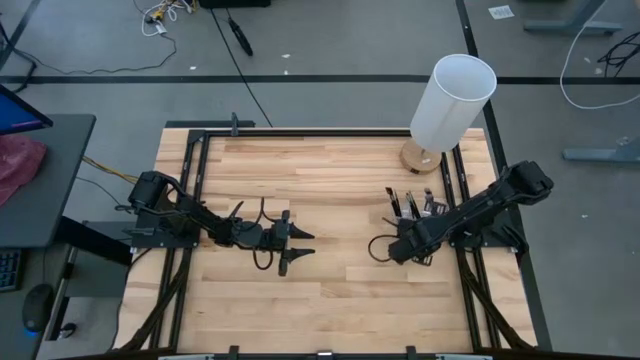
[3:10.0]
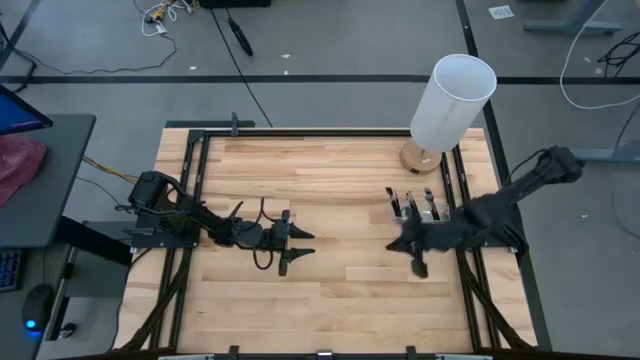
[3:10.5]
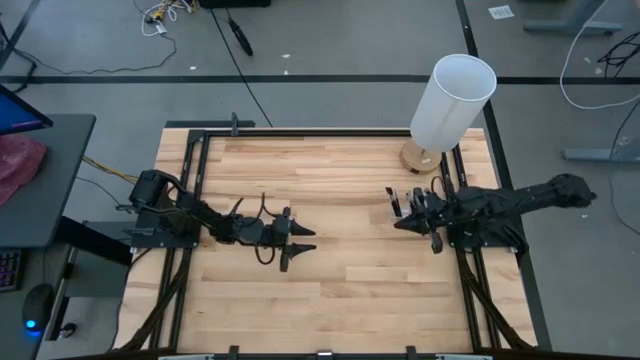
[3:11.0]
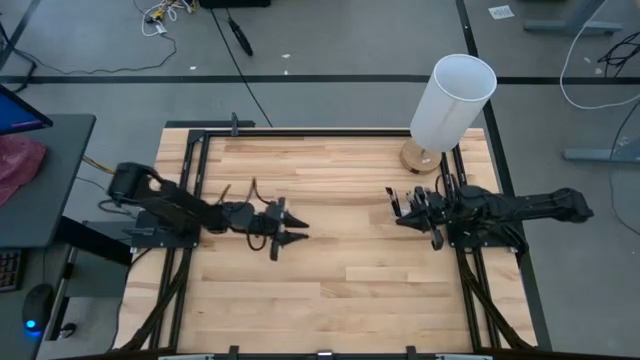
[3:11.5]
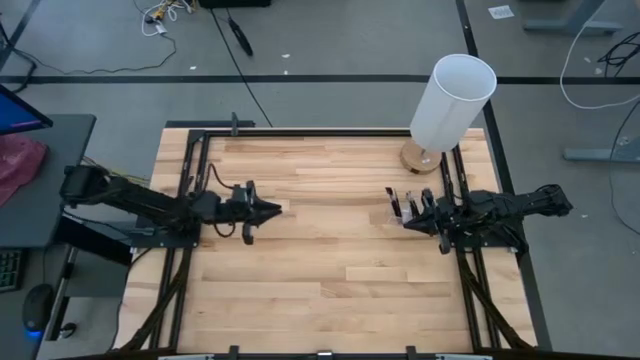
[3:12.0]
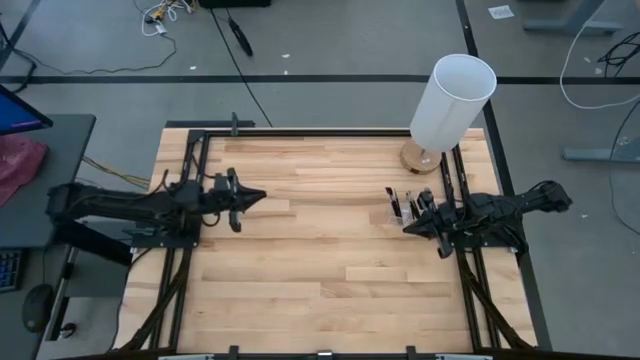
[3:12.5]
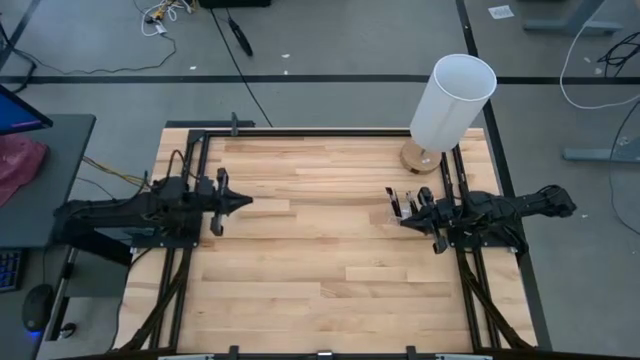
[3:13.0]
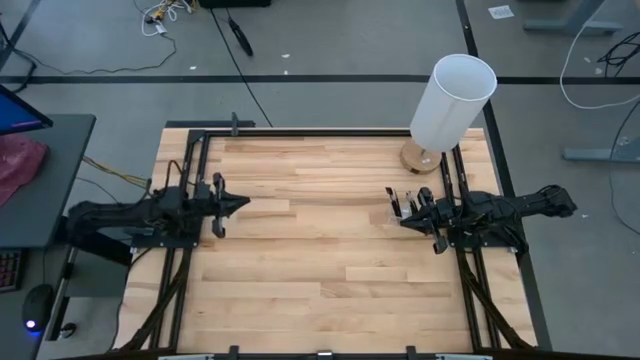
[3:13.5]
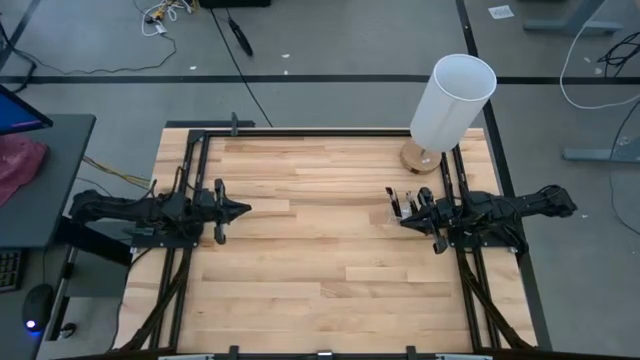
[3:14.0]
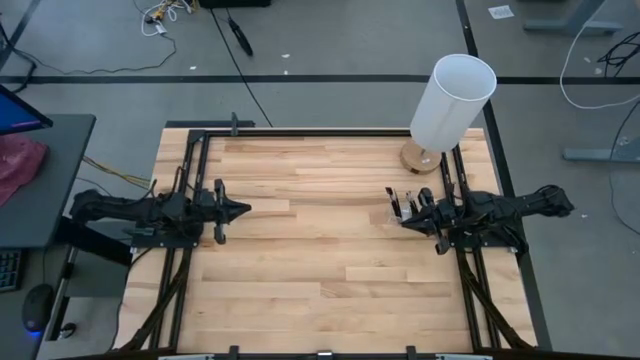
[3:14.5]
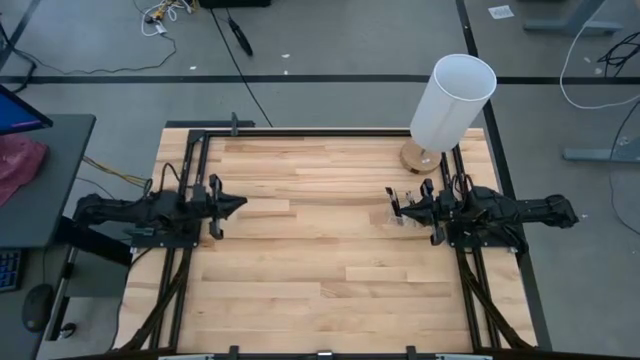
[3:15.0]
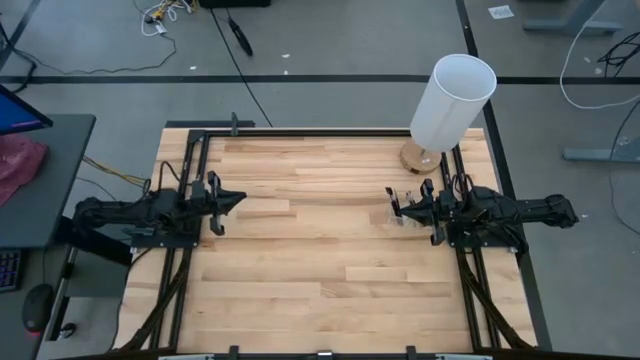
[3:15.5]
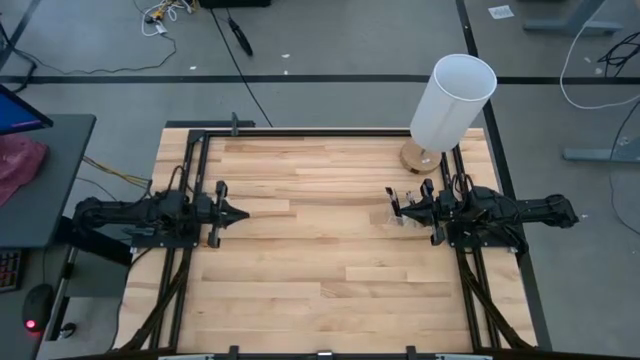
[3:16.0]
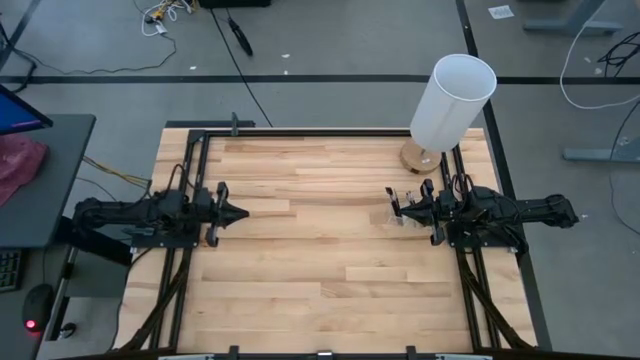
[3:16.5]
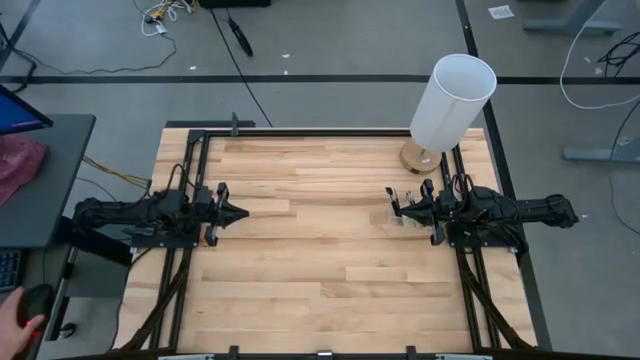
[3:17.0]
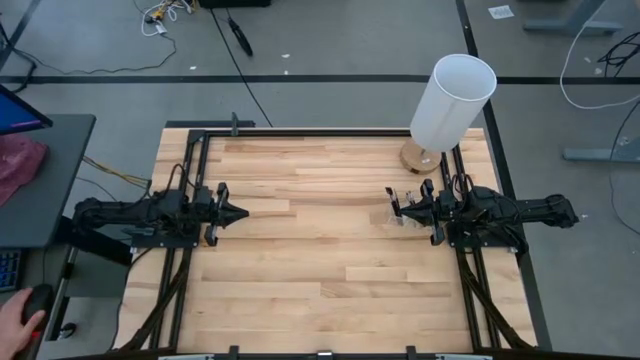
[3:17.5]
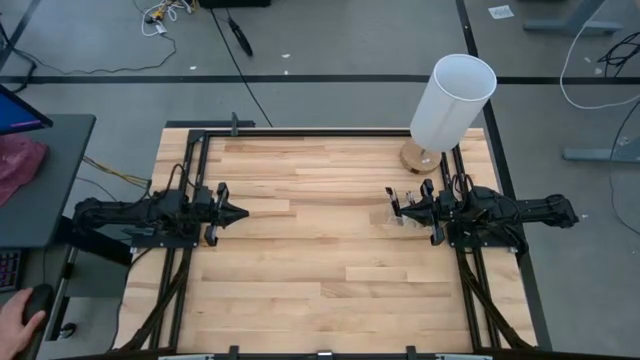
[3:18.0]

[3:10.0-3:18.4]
Task: Put items in baskets/containers
Return to Home Position

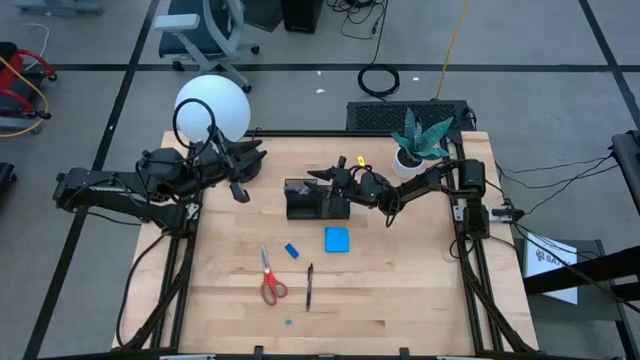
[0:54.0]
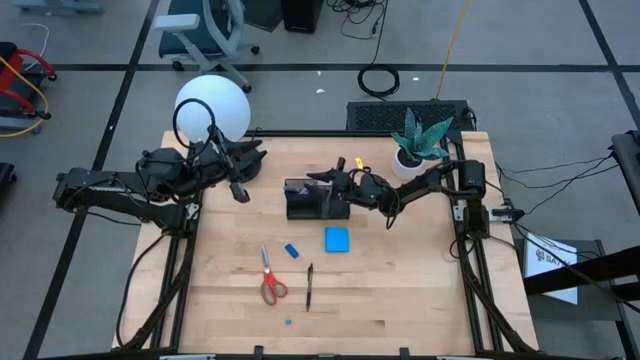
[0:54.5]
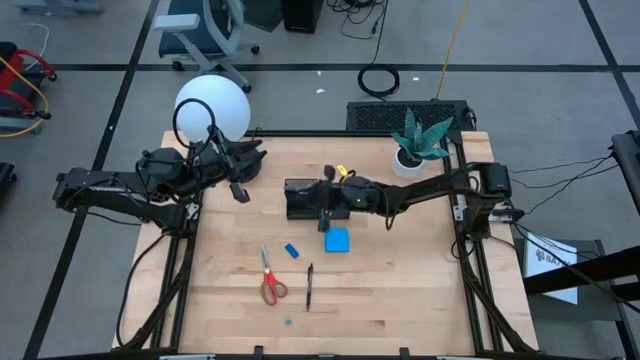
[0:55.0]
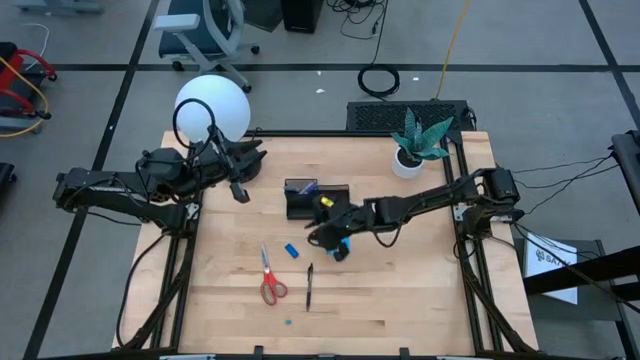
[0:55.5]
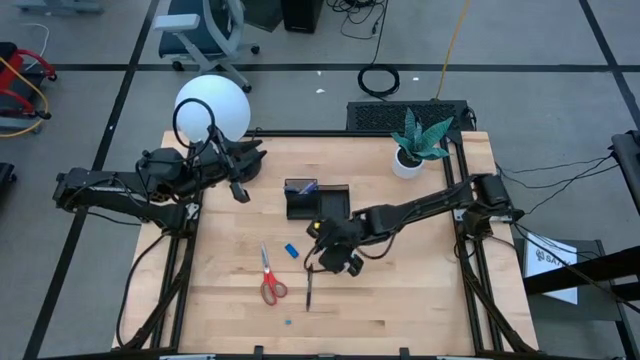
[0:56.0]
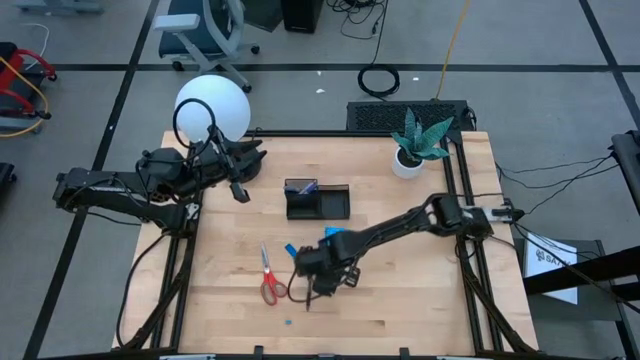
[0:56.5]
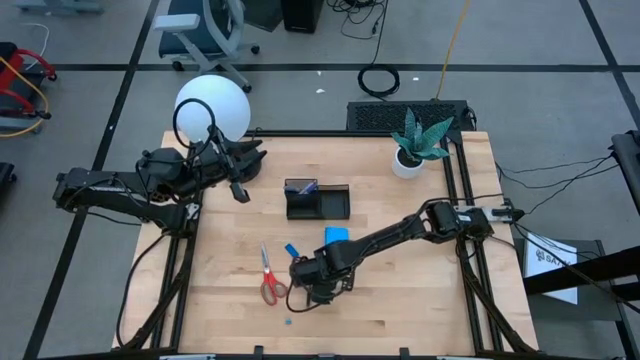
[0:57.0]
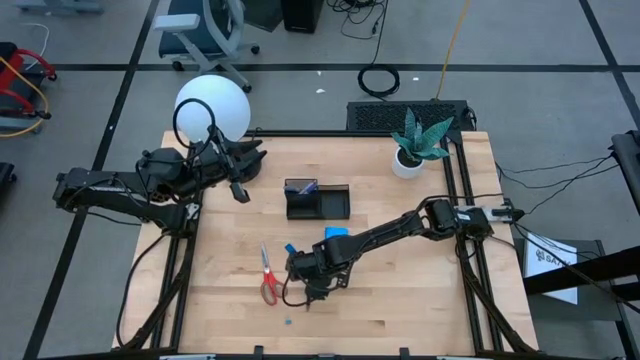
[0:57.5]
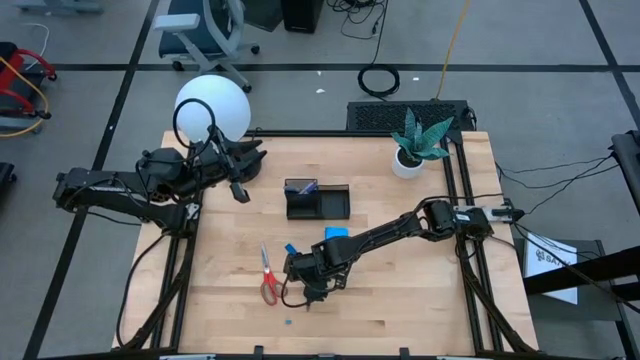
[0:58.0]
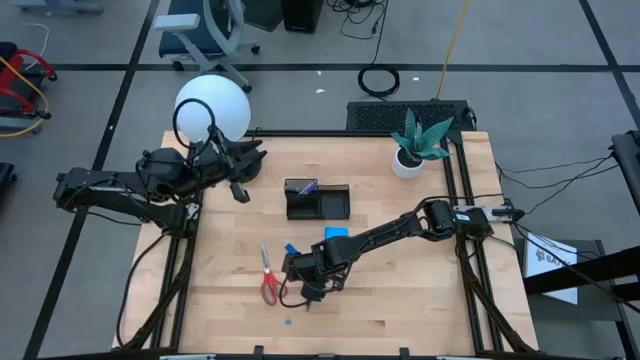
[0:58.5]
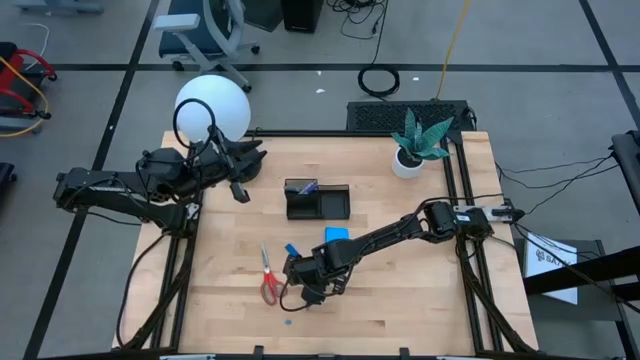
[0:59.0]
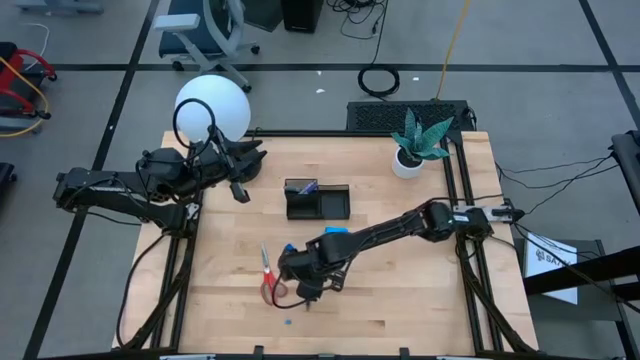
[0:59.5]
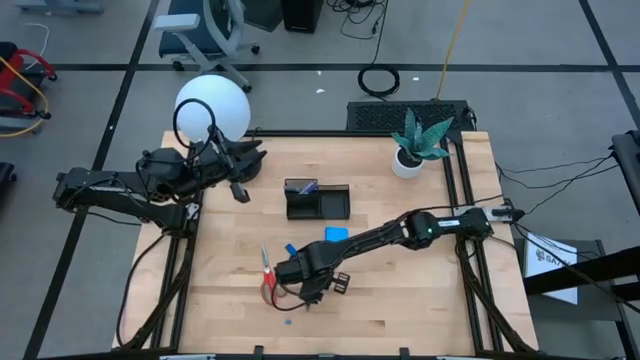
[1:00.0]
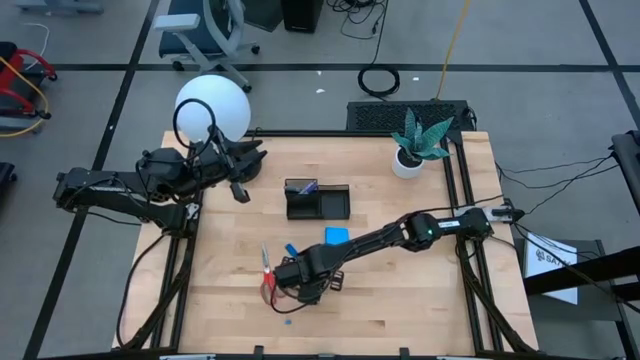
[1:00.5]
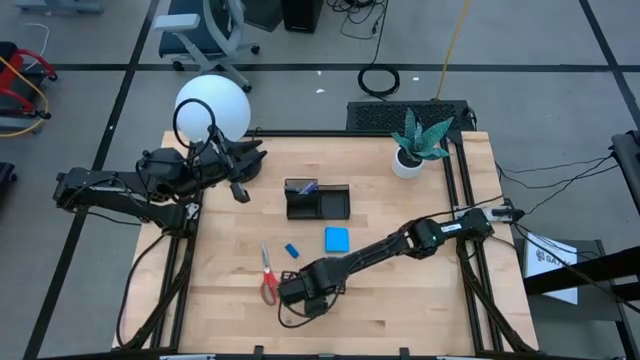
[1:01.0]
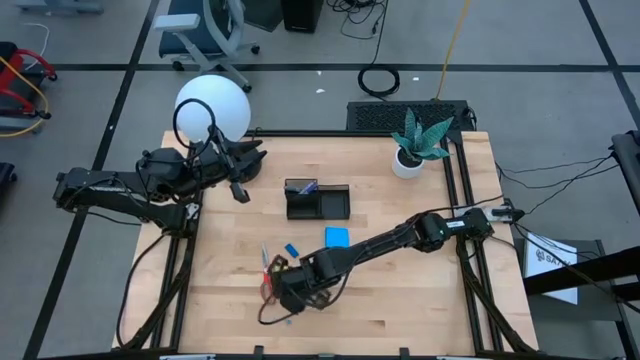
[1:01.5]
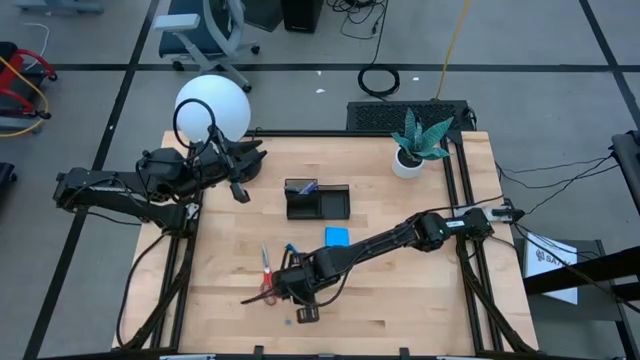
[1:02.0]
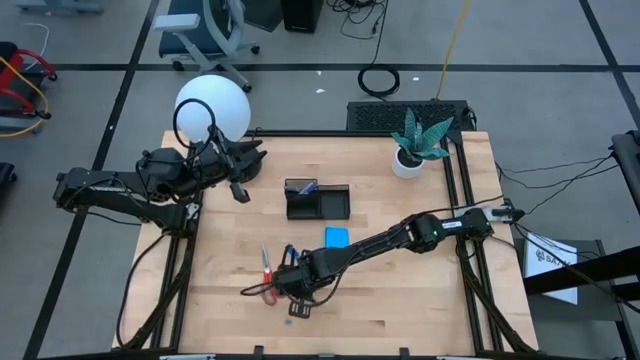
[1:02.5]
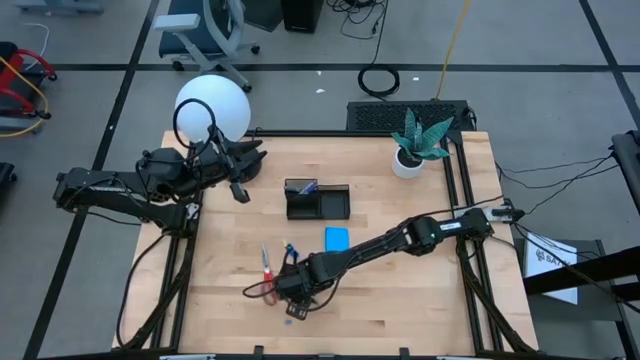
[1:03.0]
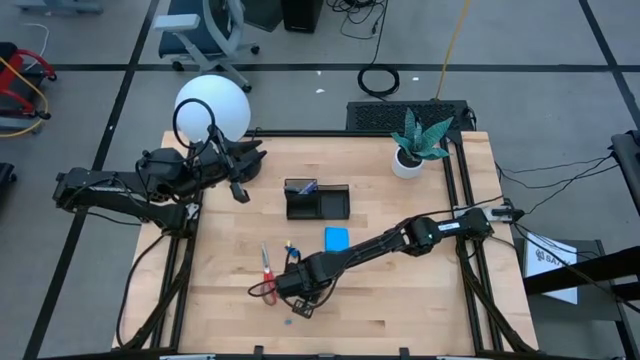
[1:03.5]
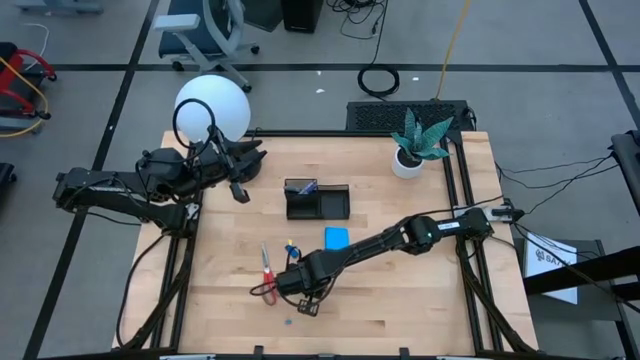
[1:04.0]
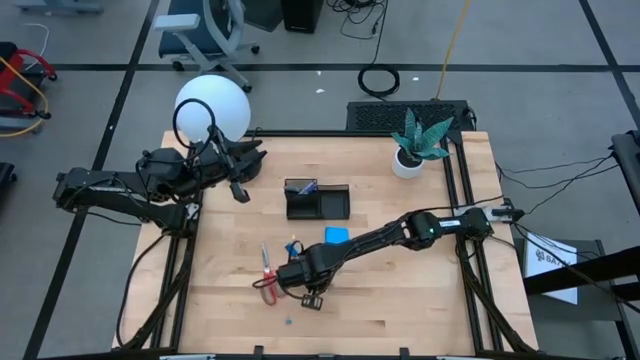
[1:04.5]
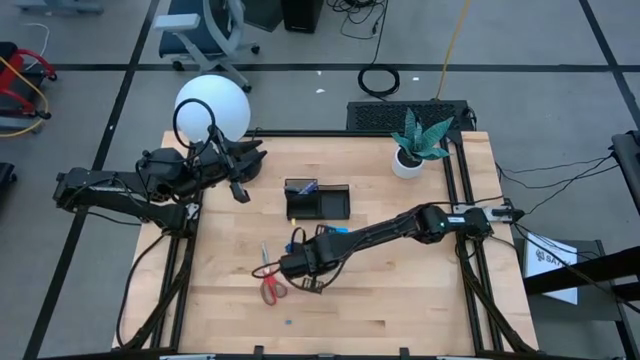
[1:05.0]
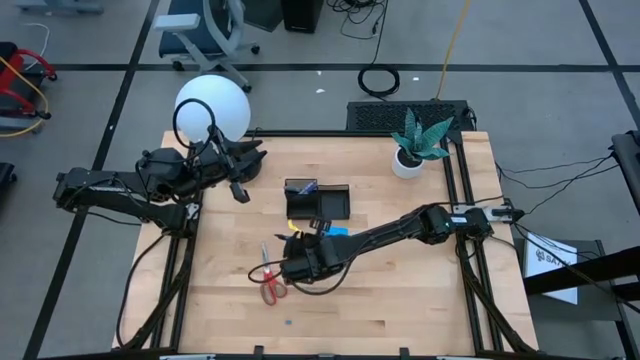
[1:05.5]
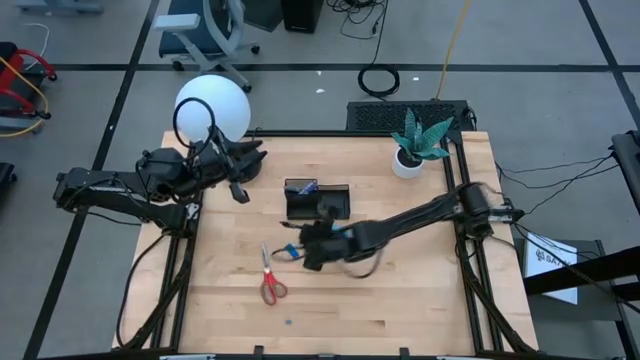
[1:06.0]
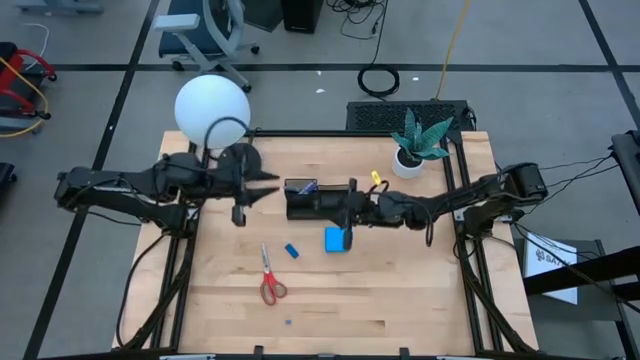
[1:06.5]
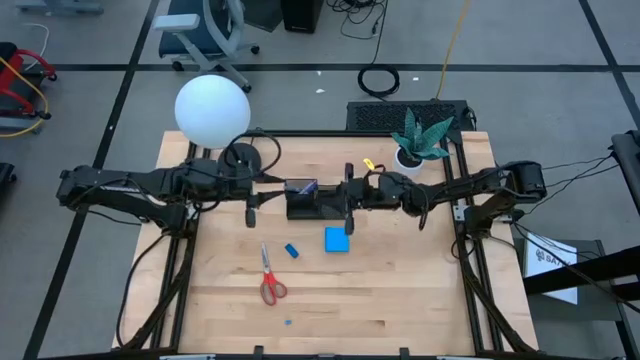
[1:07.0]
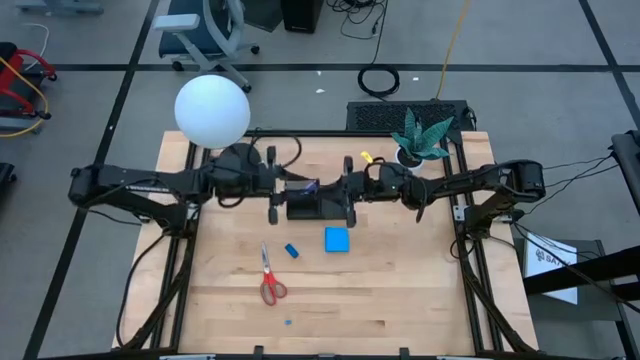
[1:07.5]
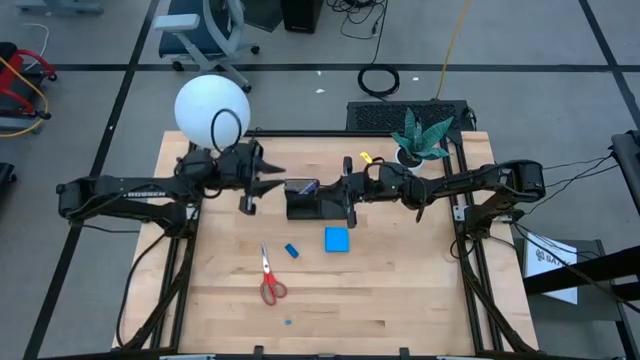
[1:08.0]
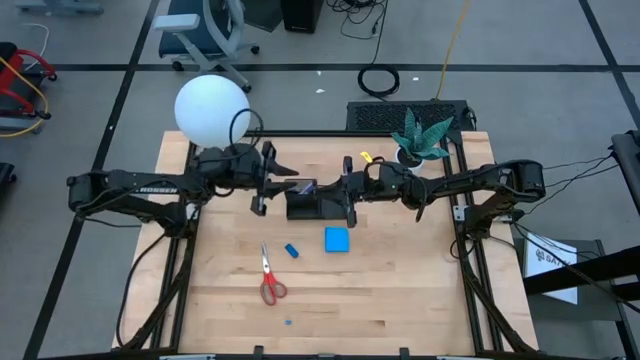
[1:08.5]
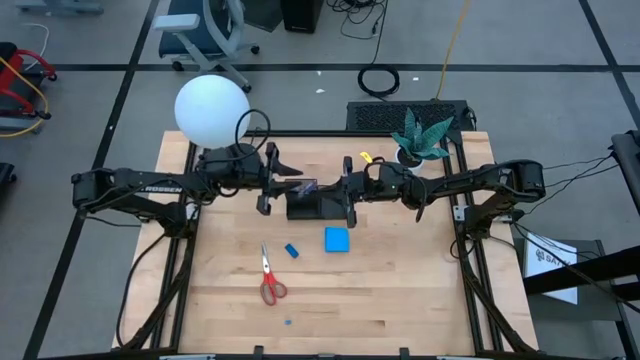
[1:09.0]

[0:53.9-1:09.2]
Task: Pick and place office supplies into organizer
Put the black pen into the black mesh organizer
